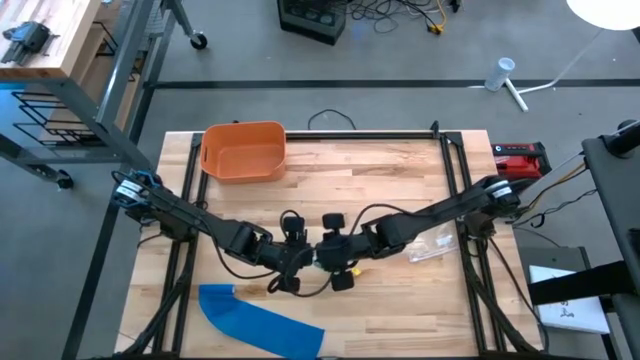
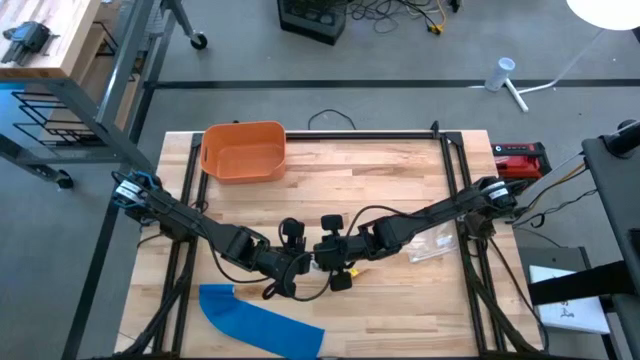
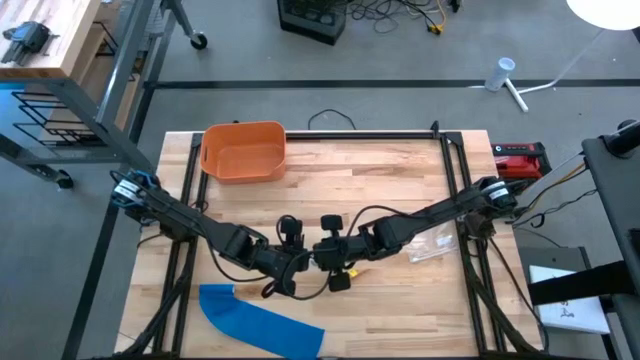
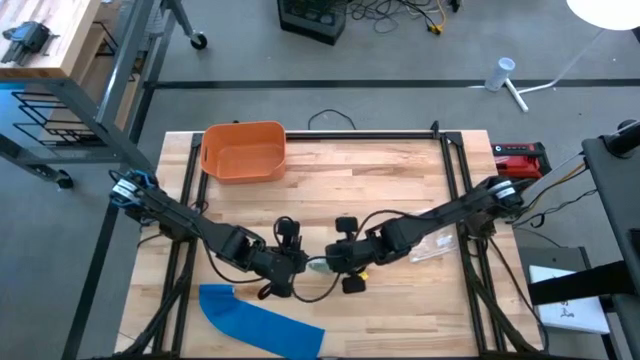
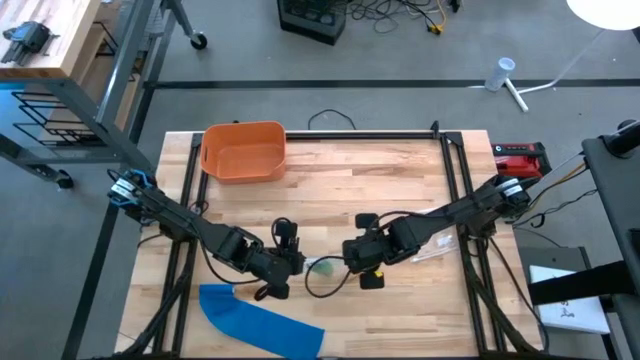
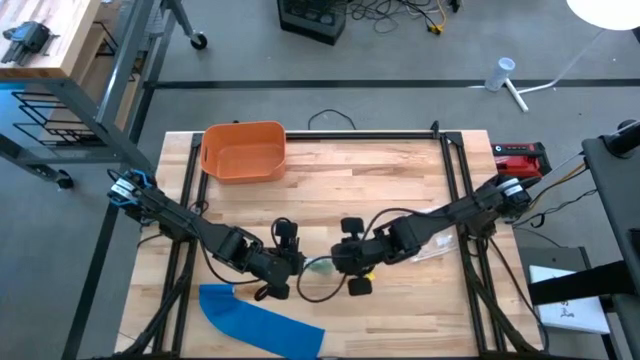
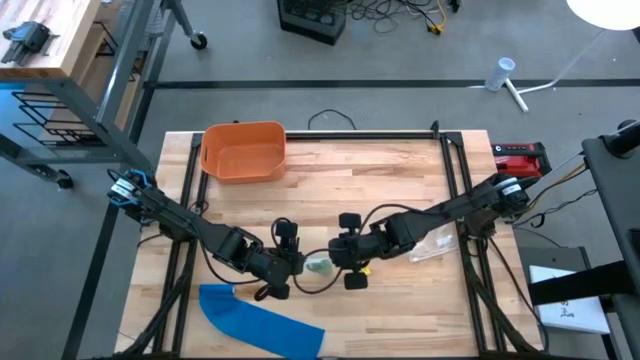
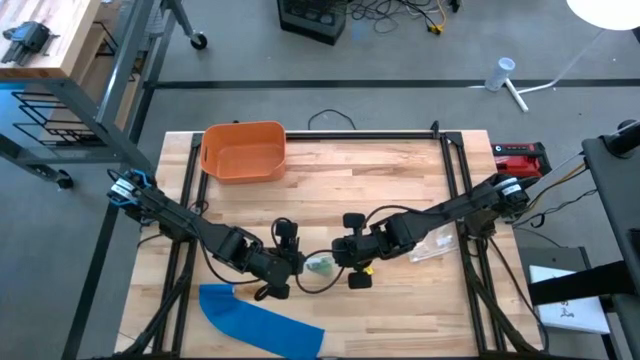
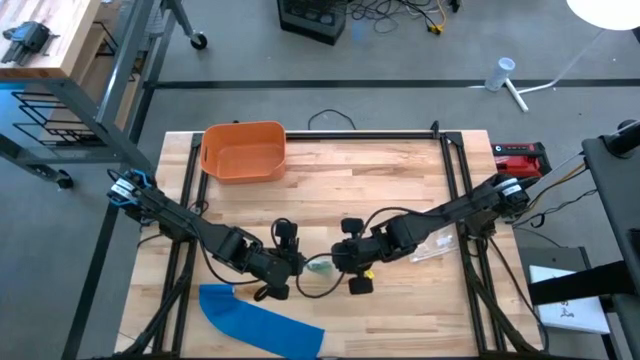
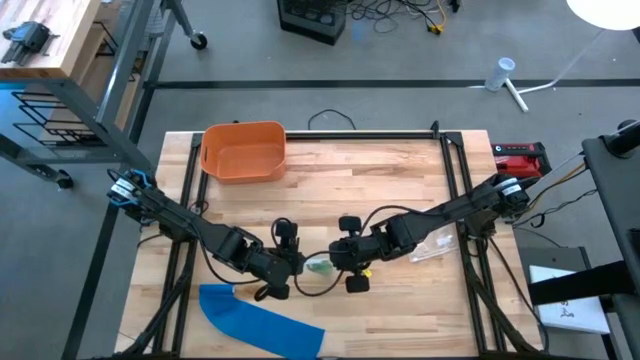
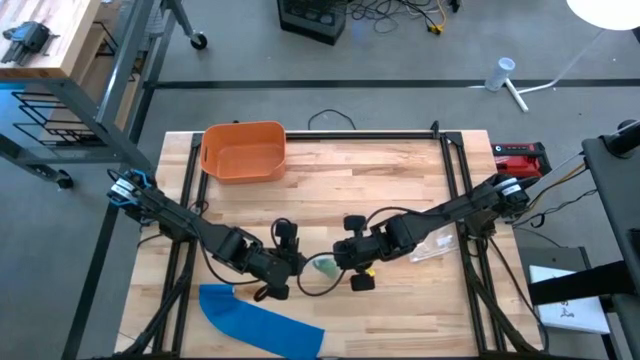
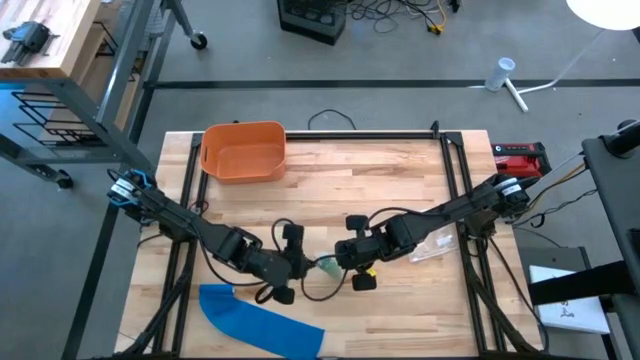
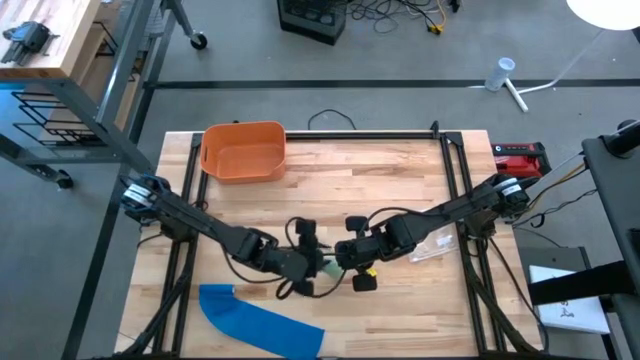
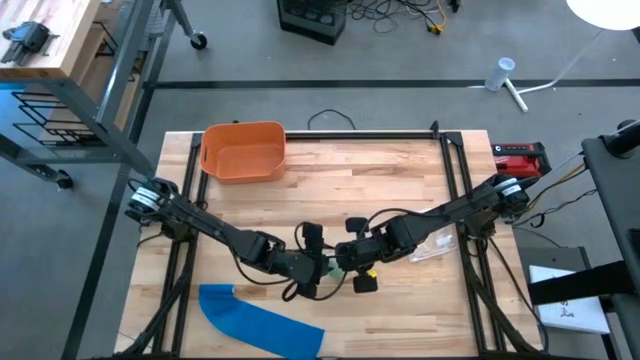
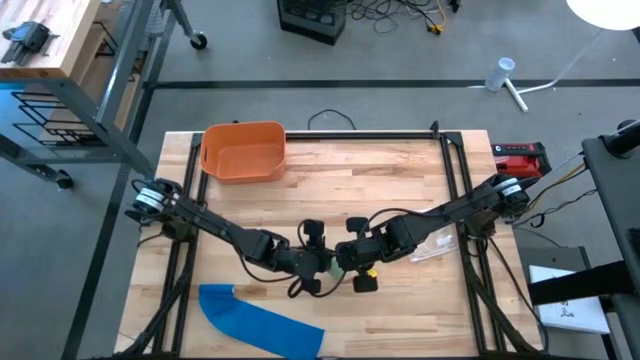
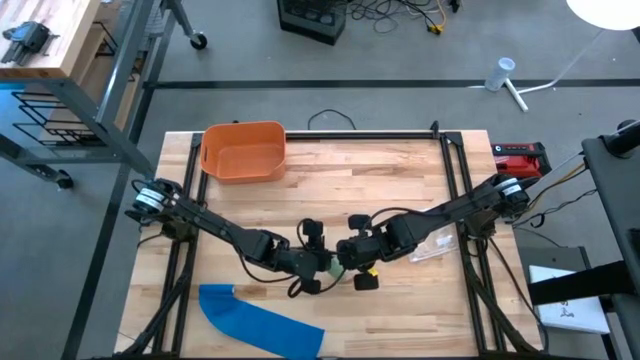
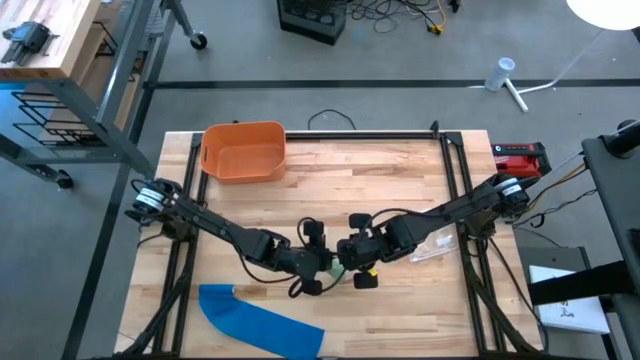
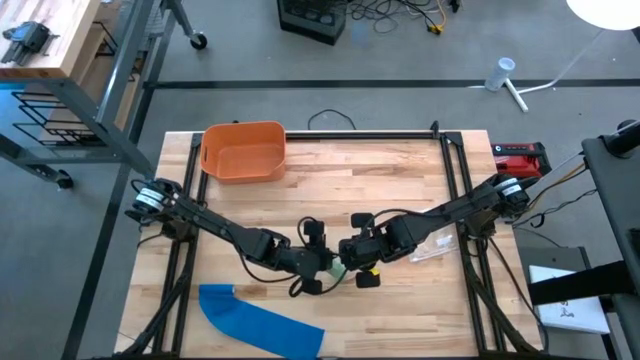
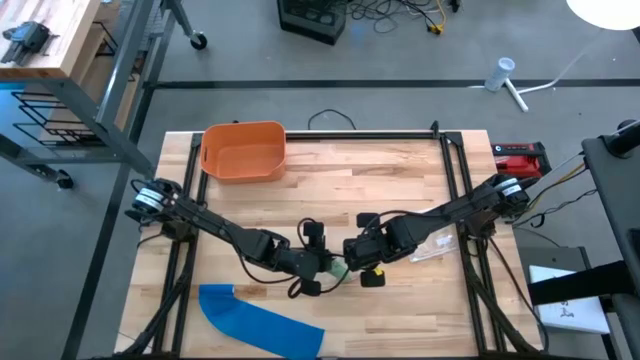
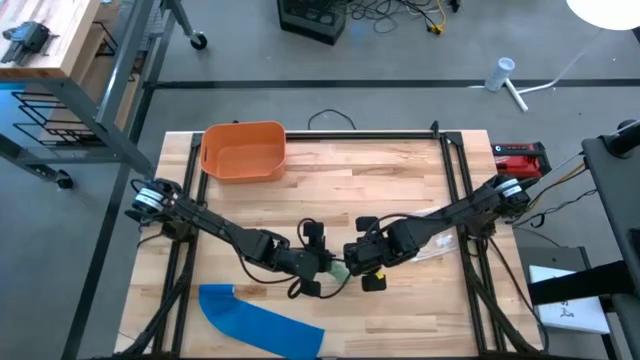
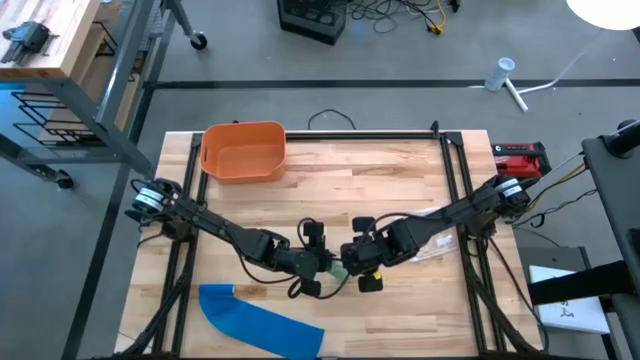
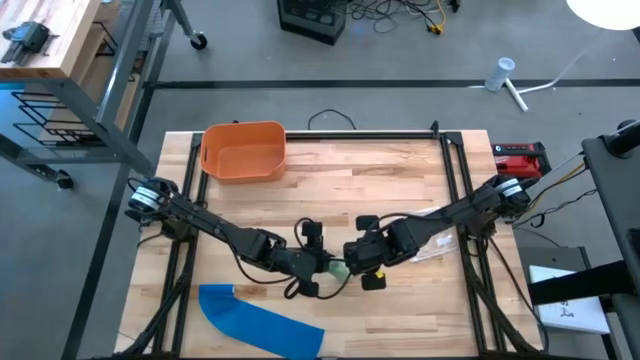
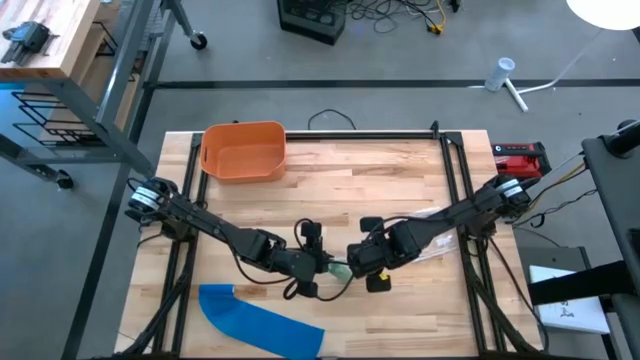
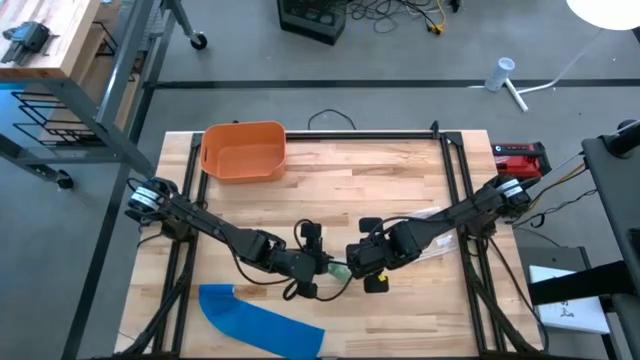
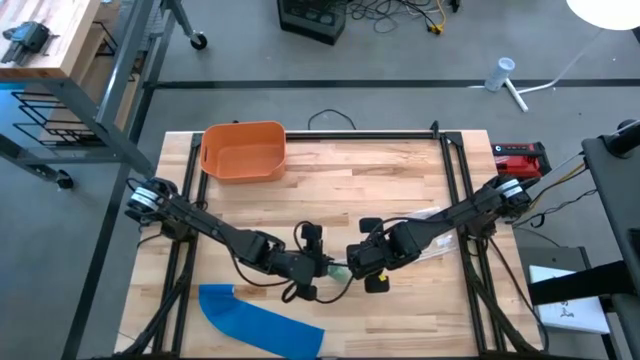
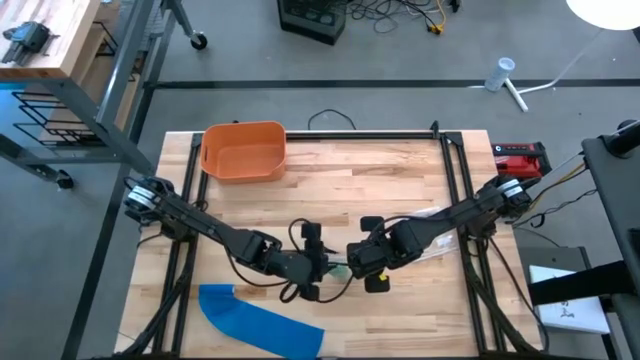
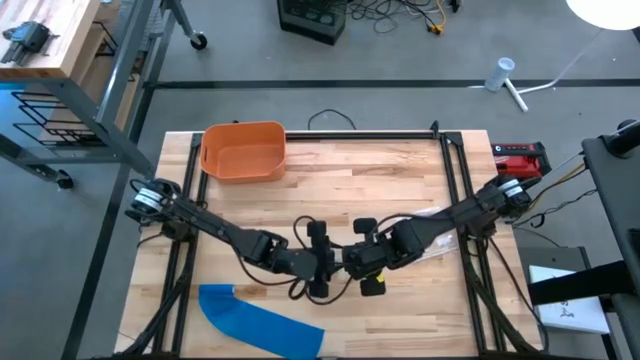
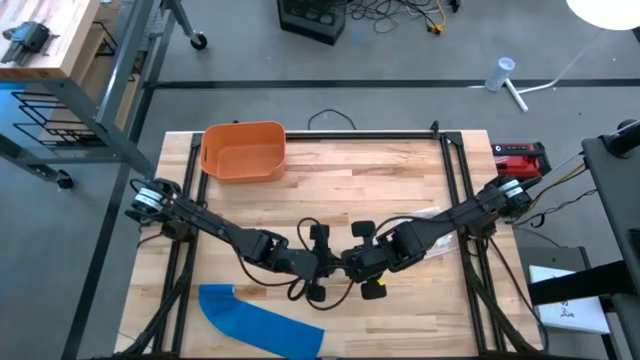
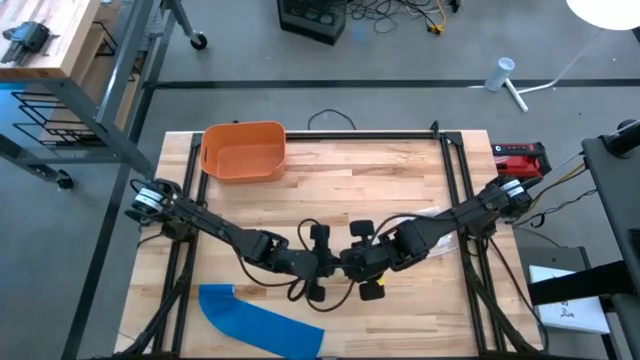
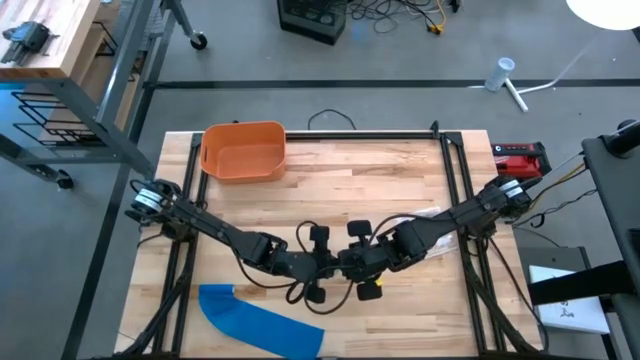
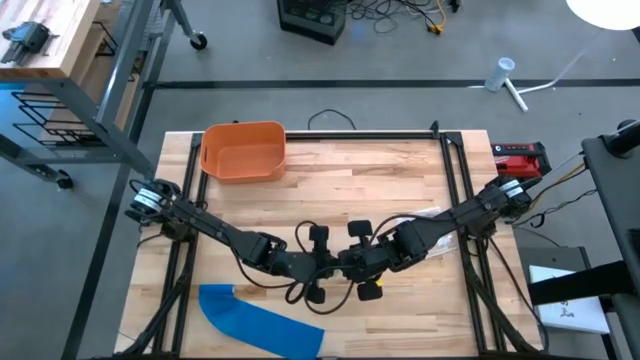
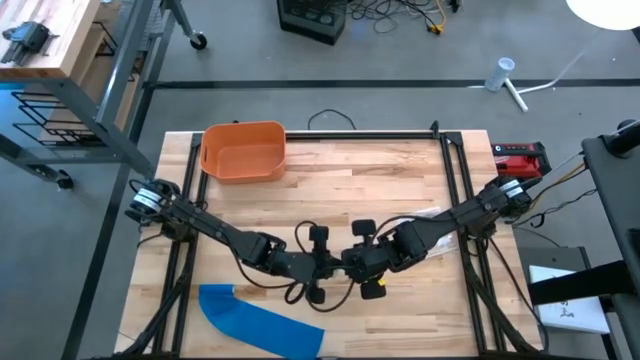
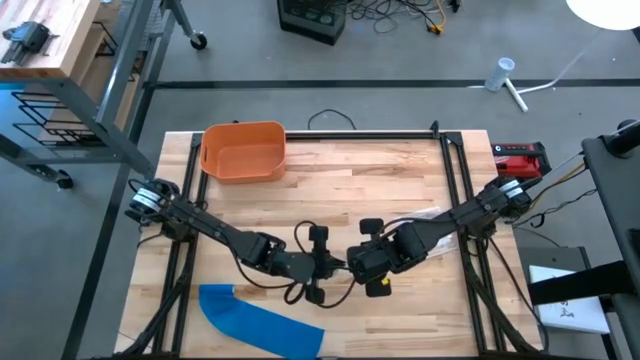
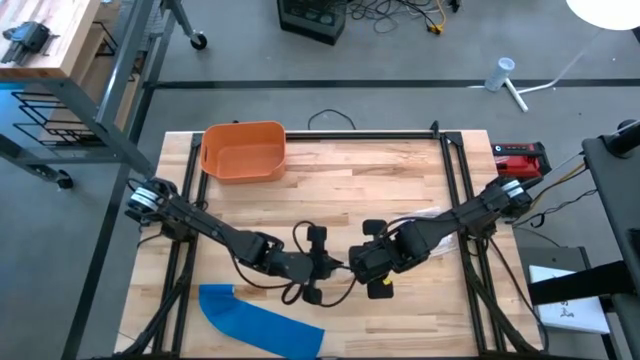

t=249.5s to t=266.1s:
Task: Roll bandage
Close the transparent zip bag

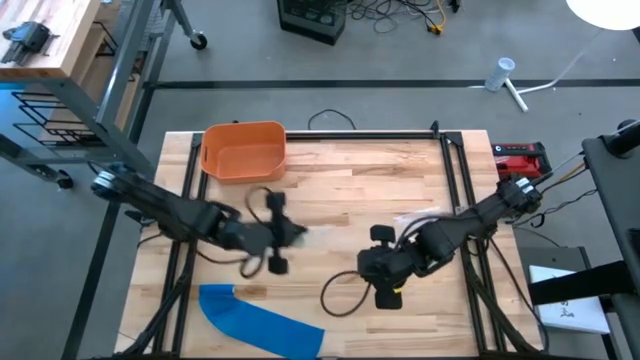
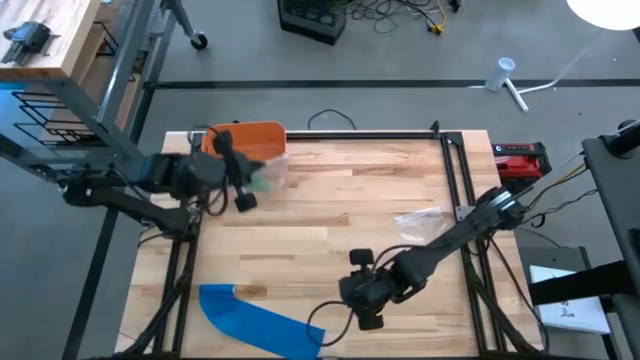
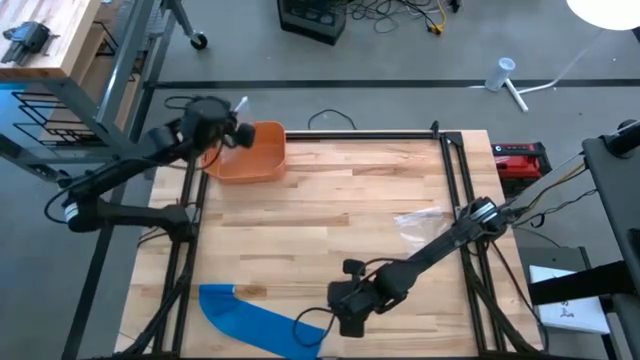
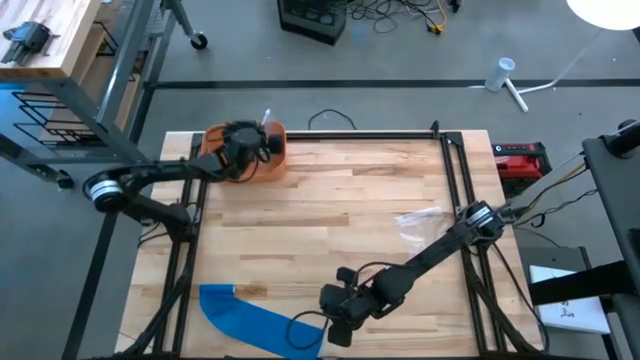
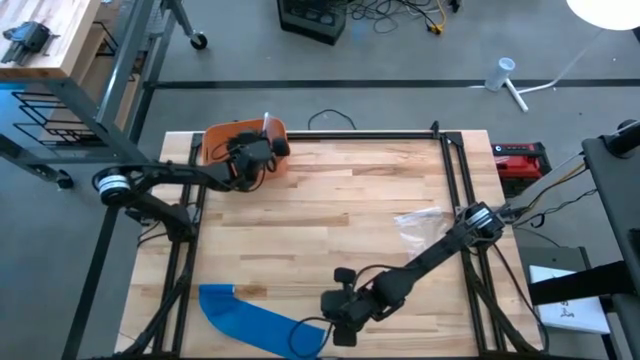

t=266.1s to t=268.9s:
Put the transparent zip bag containing the rolled green bandage into the orange bin

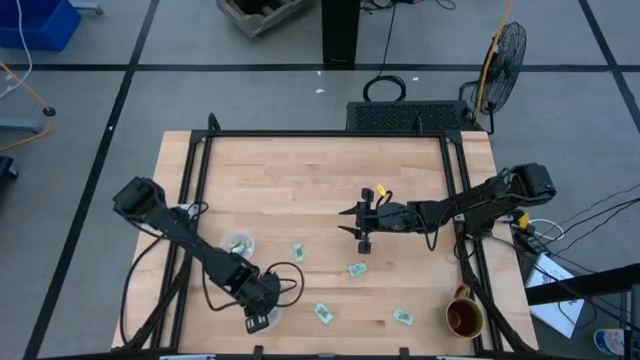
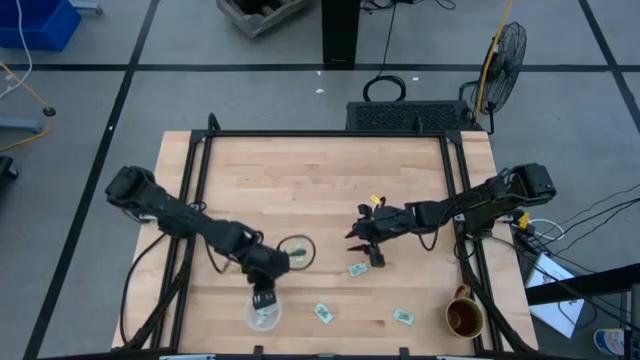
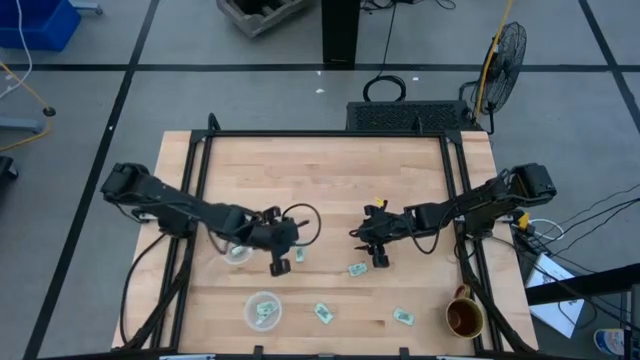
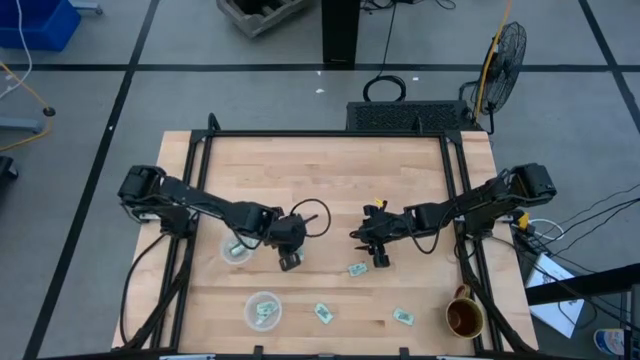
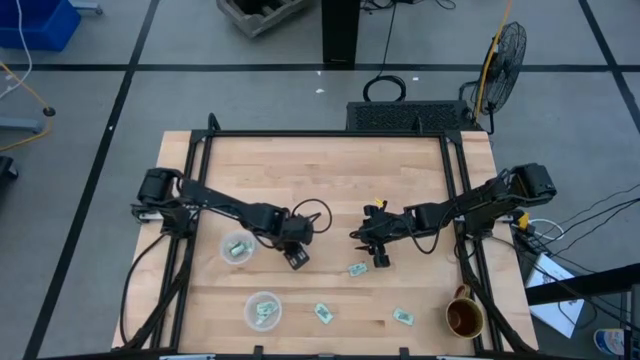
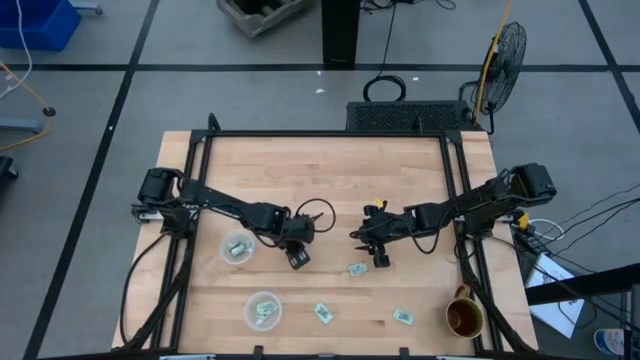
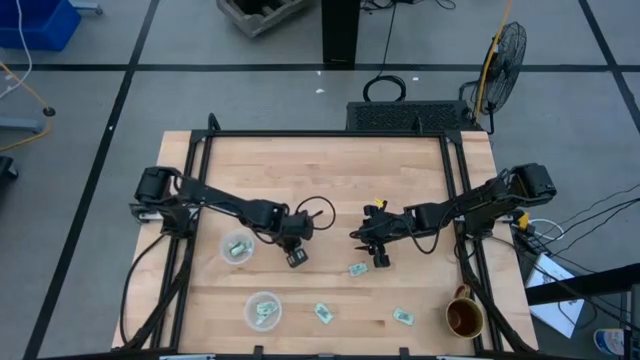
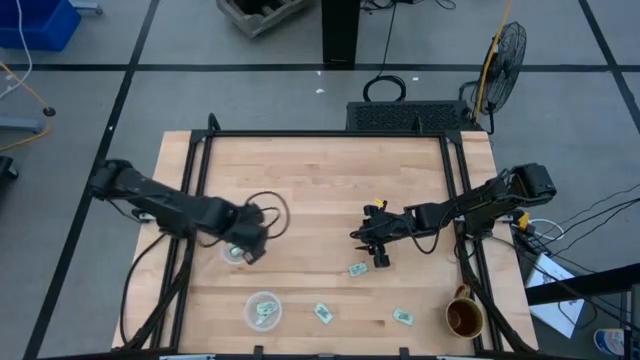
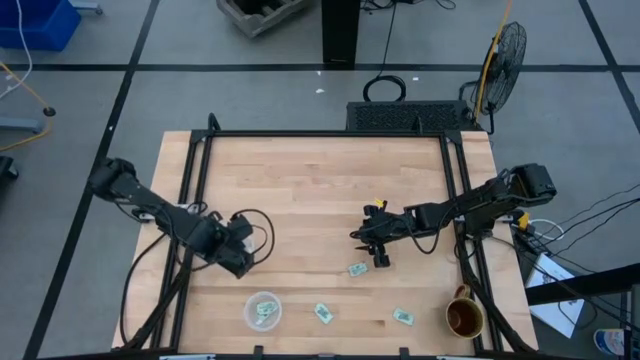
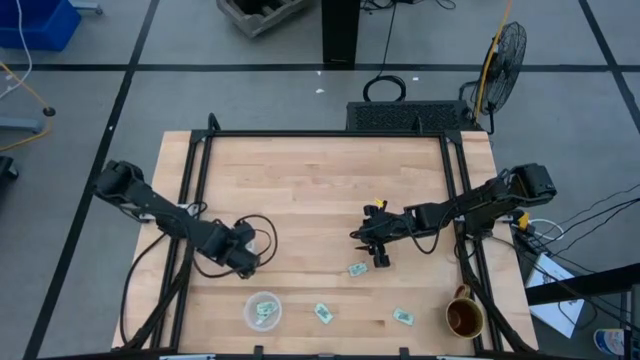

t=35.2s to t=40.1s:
Task: Pick and place Stevia / Truvia into bins
Put the stevia packet into the top container
